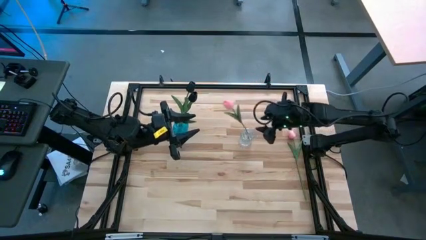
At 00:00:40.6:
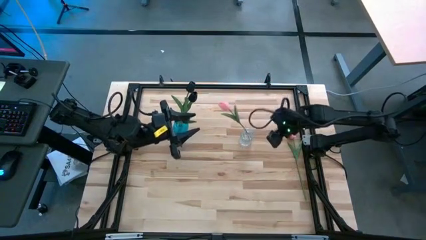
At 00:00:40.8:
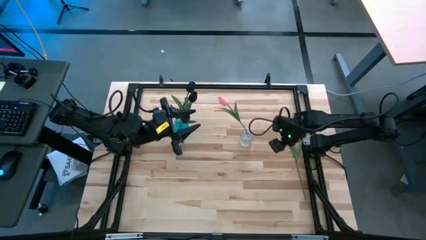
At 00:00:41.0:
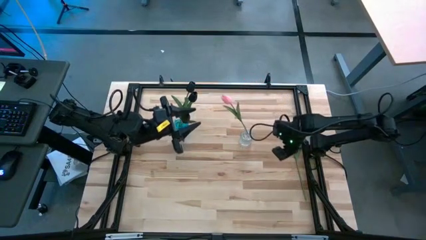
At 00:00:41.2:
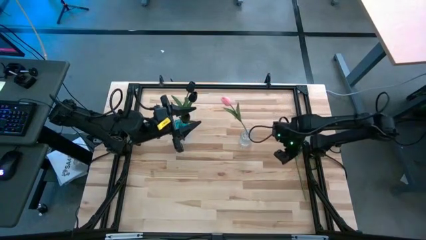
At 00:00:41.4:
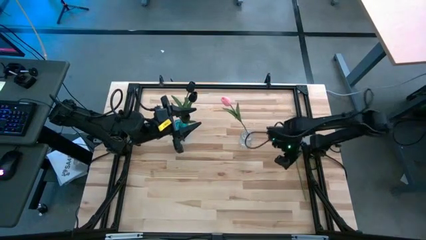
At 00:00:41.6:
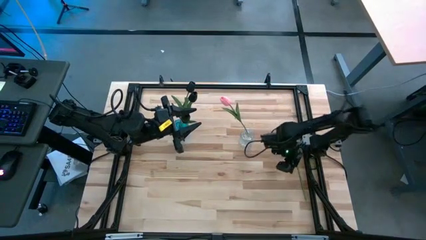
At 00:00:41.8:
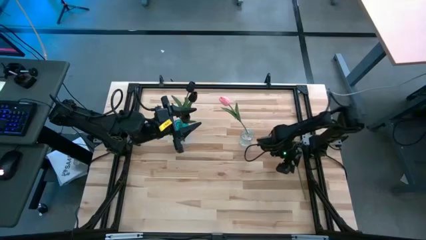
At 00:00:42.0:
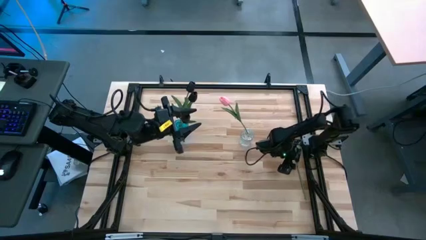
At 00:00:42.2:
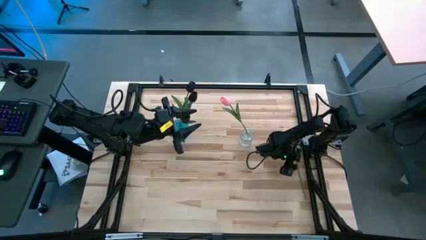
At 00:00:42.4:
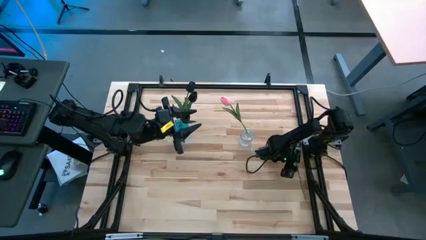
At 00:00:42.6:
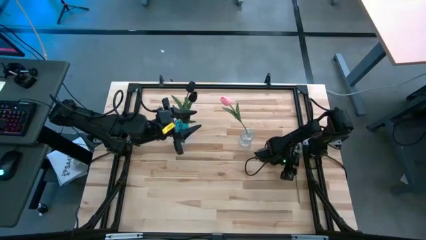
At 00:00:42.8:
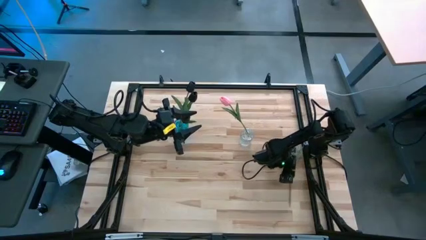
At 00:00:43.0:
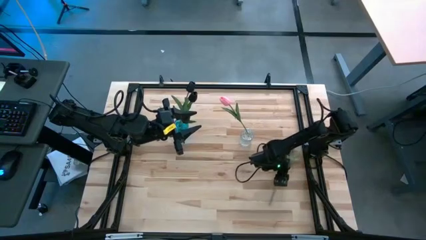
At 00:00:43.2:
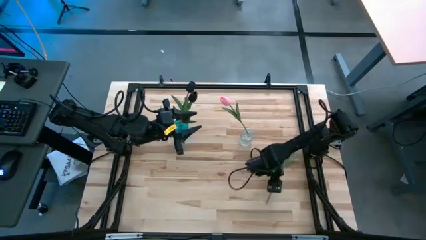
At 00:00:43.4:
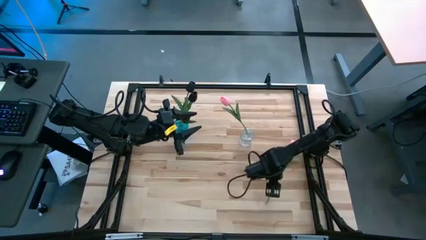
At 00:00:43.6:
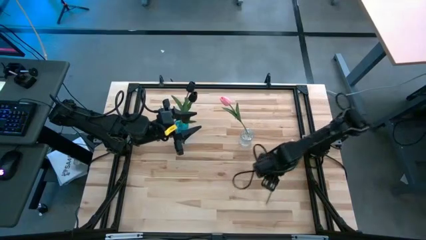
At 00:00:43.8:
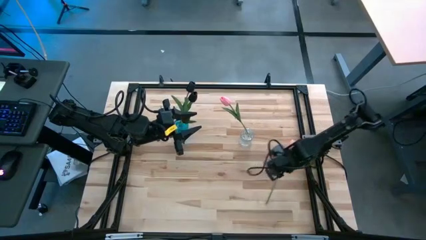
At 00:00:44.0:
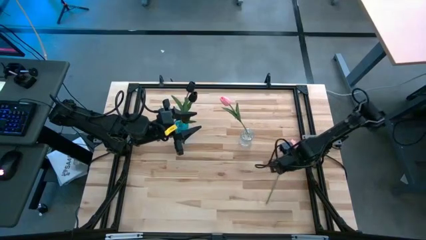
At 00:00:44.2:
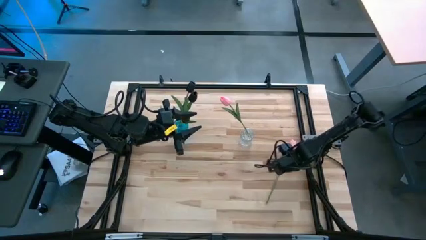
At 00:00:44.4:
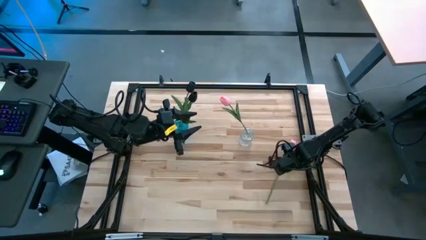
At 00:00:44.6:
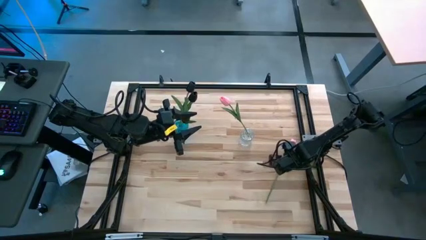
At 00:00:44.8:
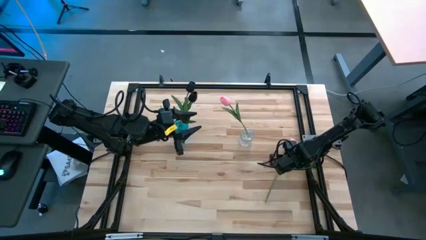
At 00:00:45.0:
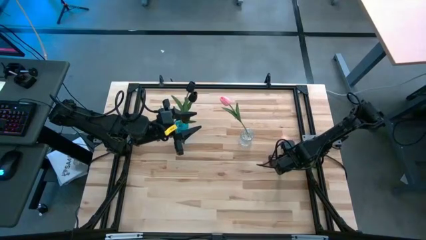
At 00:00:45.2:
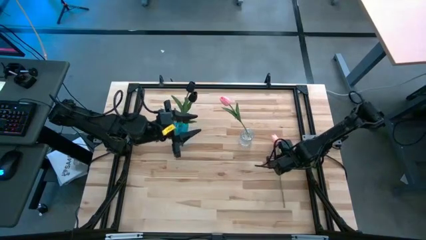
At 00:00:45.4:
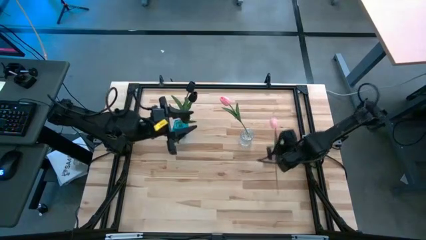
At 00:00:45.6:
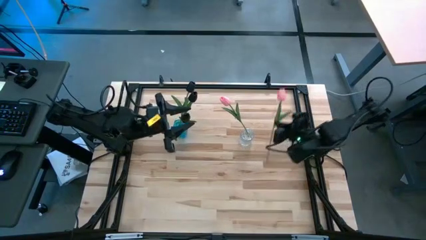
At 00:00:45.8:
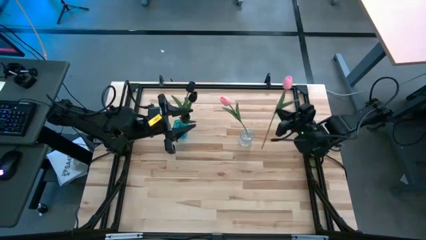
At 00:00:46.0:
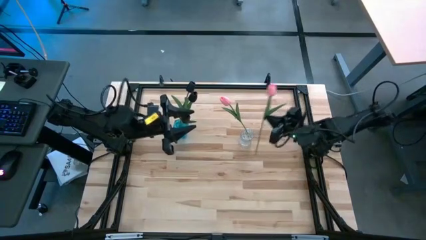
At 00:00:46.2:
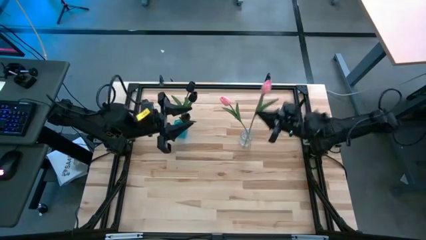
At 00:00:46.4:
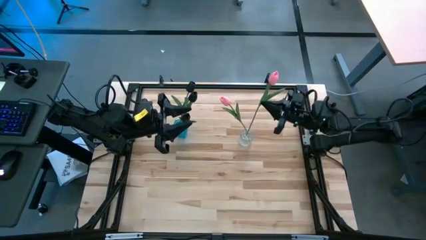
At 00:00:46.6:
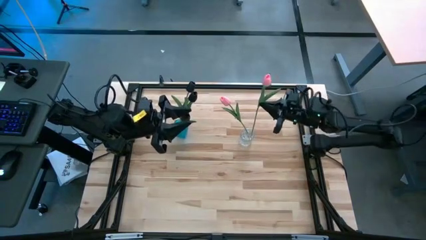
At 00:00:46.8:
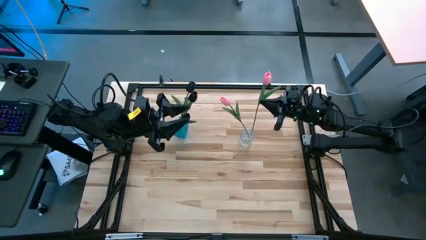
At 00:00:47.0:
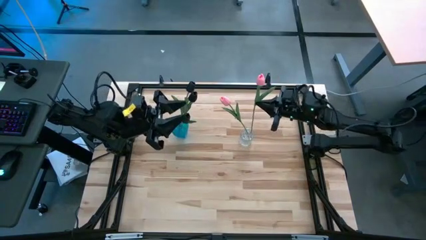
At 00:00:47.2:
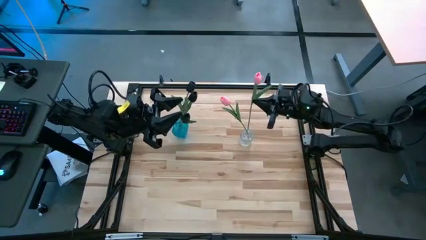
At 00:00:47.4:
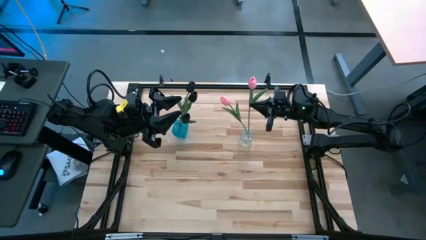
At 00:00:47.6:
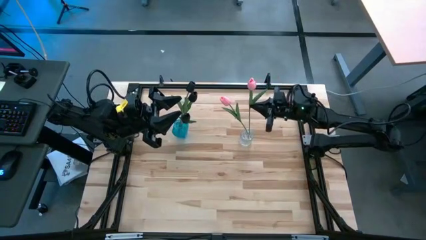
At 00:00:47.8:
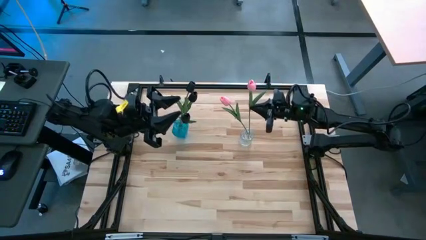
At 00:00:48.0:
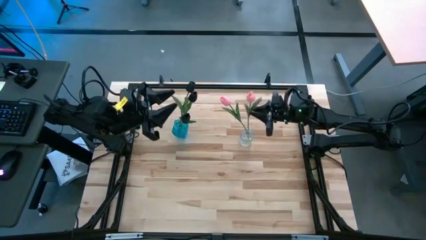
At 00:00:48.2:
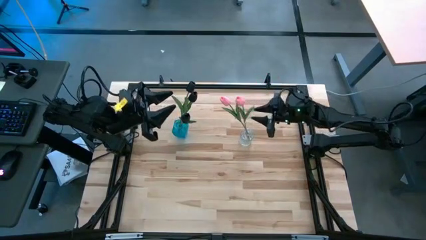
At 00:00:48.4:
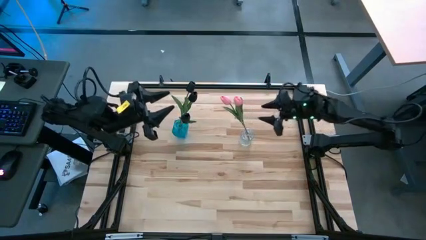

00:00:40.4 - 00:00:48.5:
Task: Sort flowers into vase by color
Put the pink flower into the transparent vase

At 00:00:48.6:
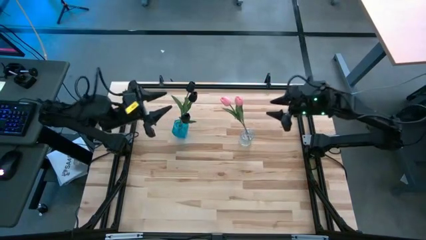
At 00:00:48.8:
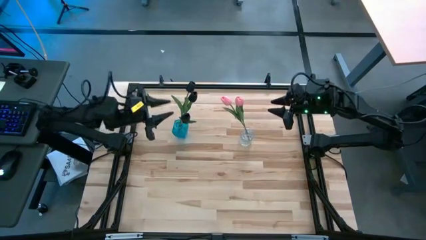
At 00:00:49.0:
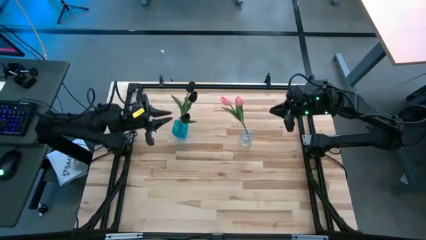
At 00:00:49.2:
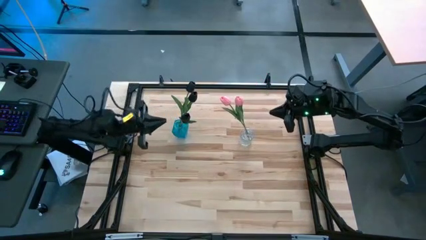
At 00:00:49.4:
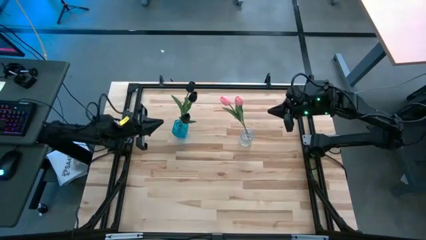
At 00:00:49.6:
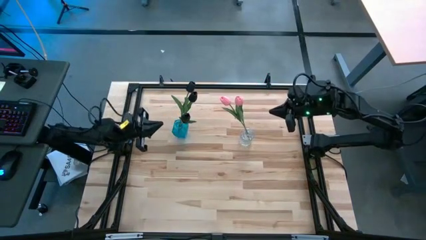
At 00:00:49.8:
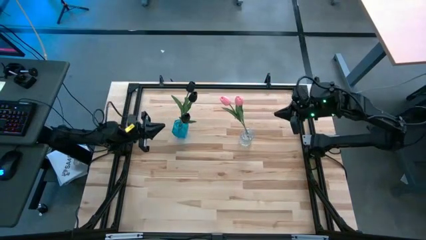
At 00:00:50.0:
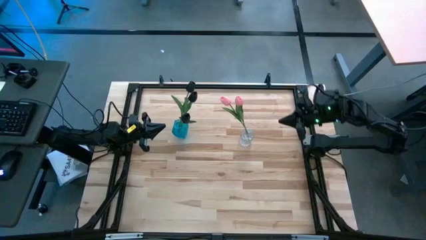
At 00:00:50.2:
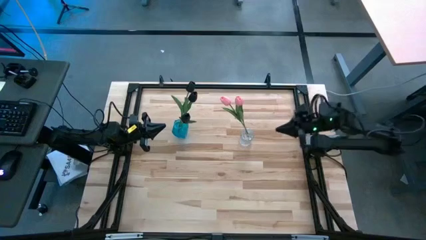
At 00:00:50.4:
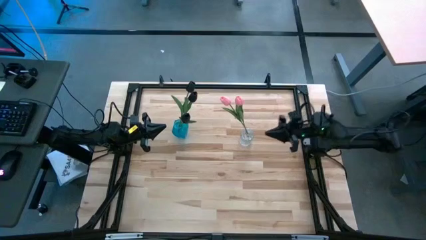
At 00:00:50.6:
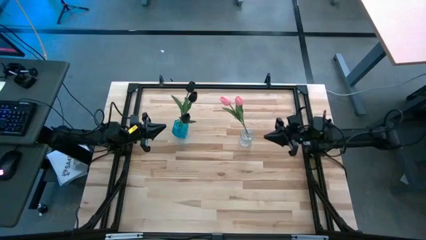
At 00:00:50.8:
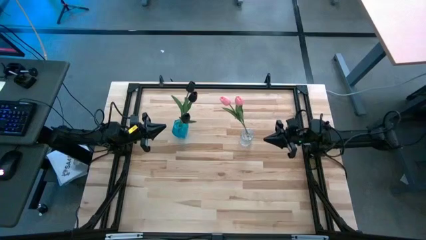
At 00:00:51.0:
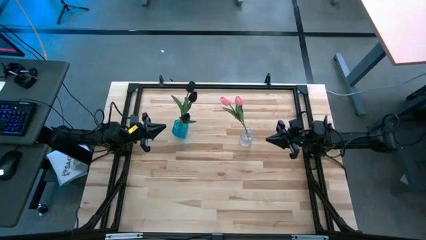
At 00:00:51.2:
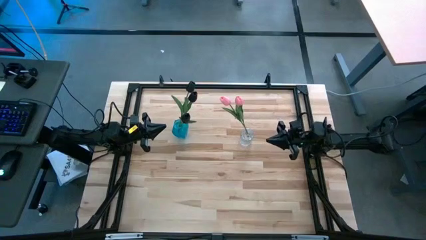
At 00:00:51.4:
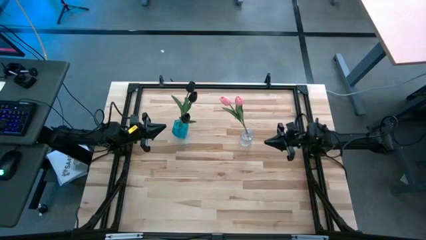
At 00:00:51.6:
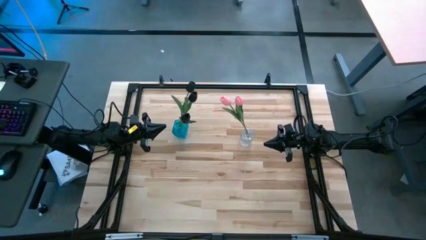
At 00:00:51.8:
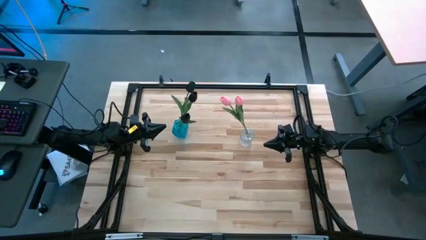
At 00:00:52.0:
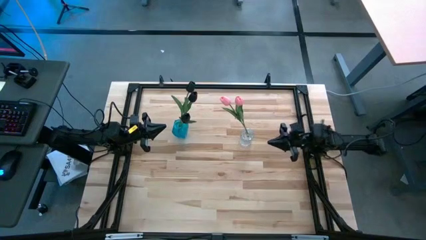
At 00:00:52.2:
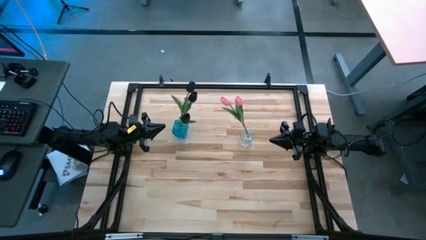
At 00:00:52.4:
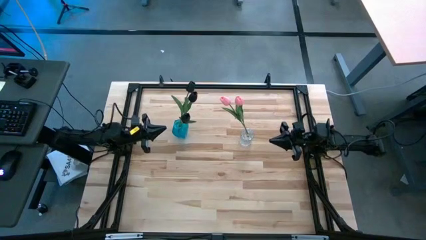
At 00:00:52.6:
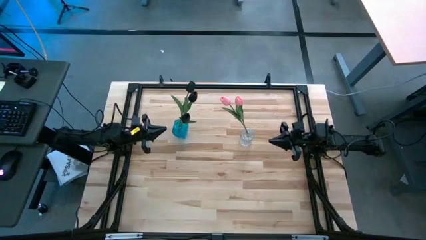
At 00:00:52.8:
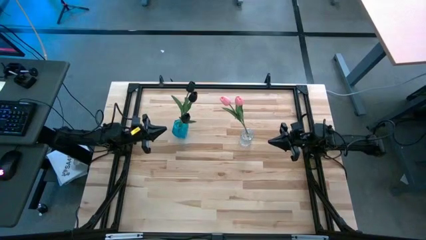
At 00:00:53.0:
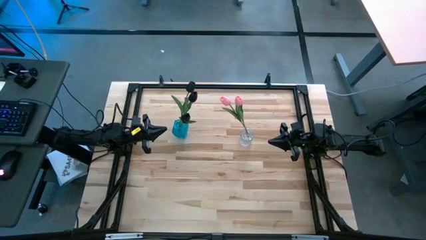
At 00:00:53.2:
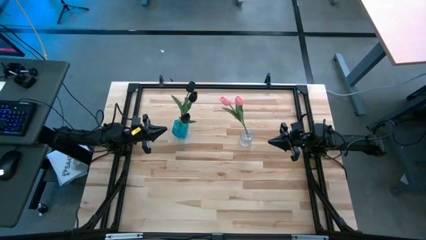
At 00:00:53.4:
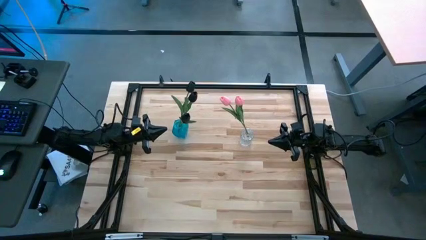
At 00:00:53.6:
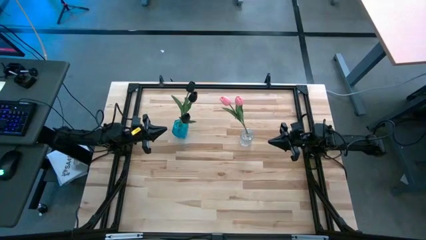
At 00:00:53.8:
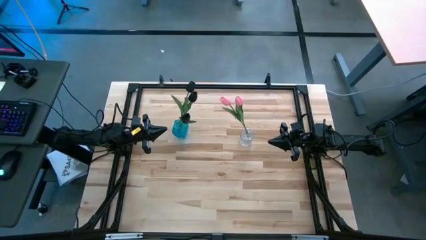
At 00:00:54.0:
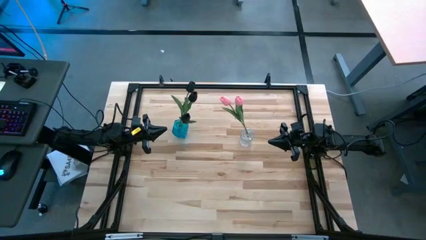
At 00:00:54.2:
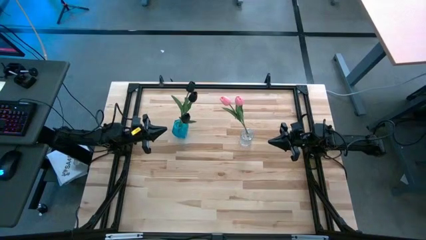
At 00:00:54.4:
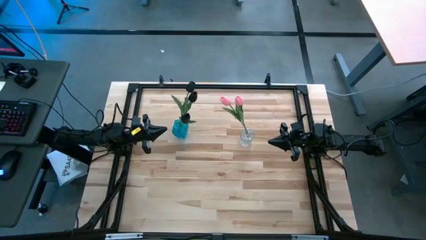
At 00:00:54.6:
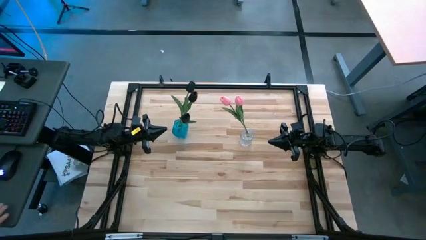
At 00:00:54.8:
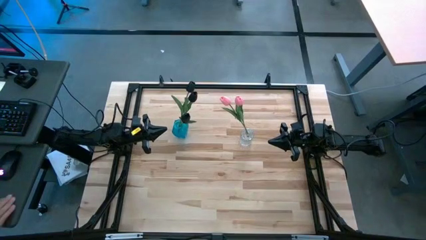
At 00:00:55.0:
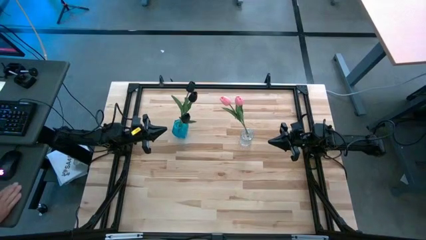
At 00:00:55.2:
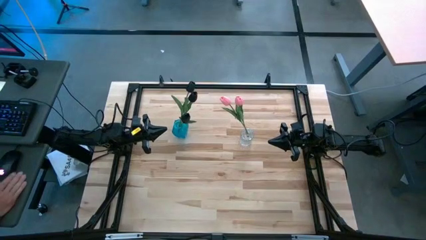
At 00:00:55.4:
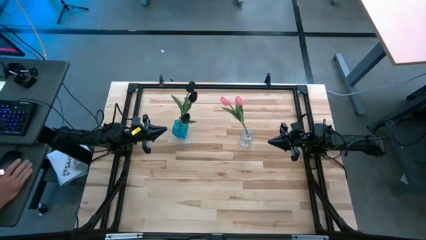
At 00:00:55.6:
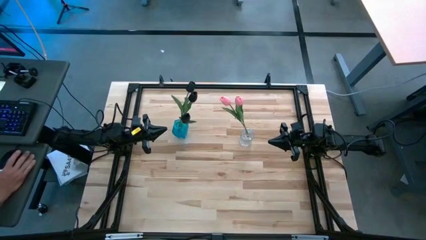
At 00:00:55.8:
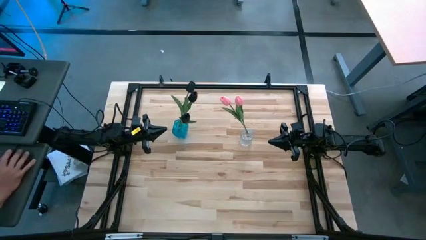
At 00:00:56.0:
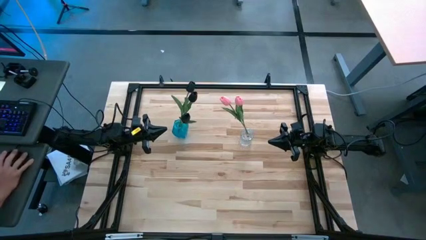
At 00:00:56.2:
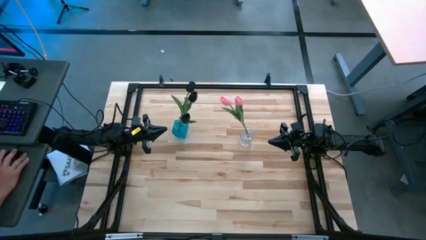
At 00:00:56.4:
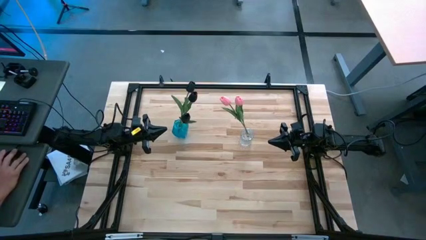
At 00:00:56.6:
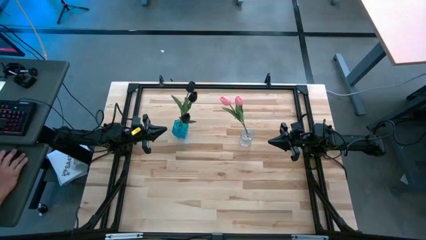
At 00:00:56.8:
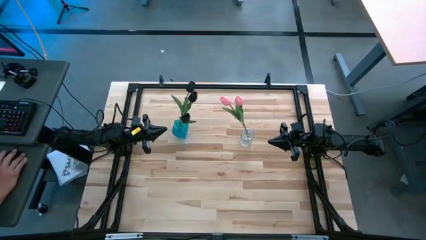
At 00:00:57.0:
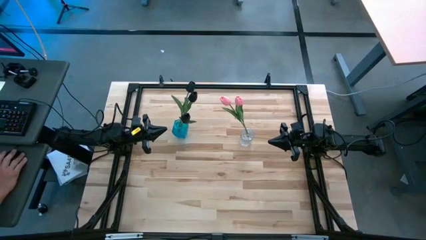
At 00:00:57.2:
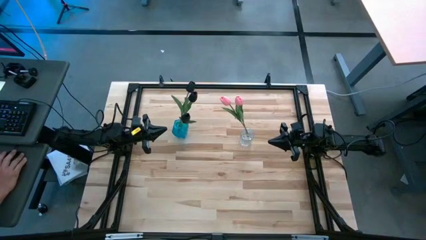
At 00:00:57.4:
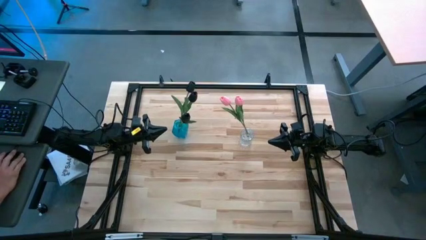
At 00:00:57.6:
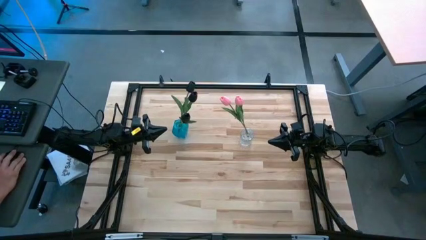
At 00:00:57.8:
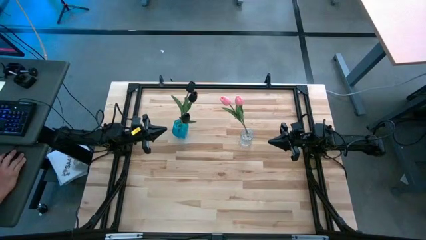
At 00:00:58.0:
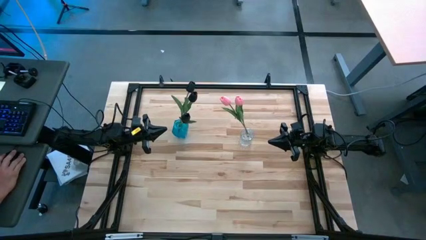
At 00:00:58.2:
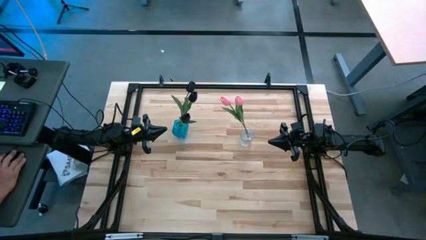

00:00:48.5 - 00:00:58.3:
Return to Home Position
